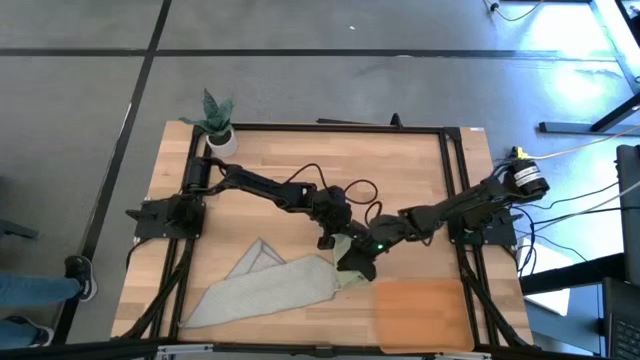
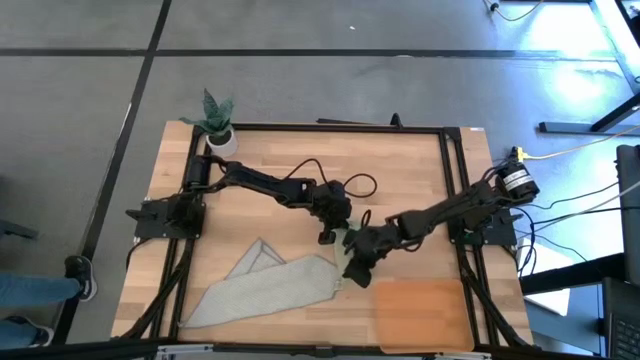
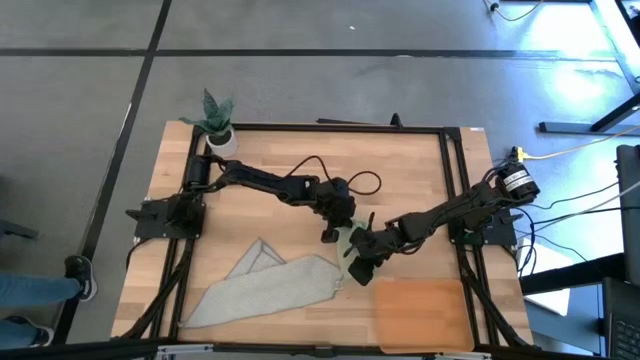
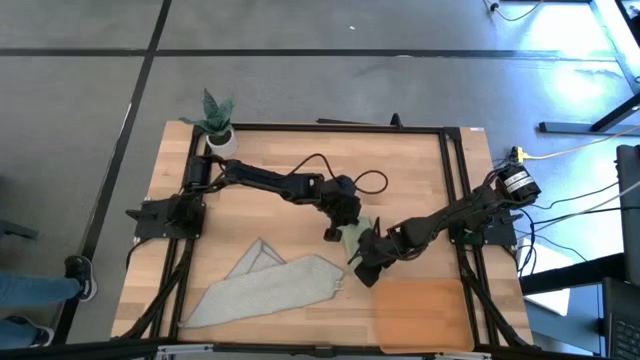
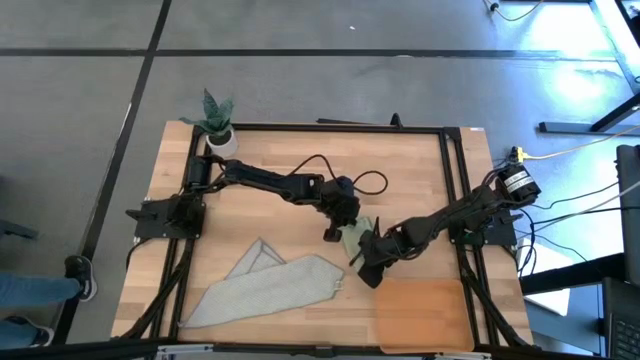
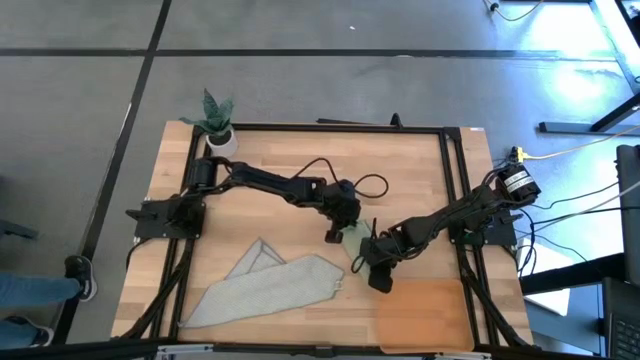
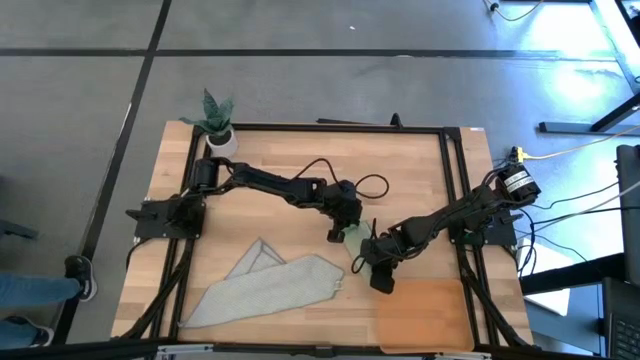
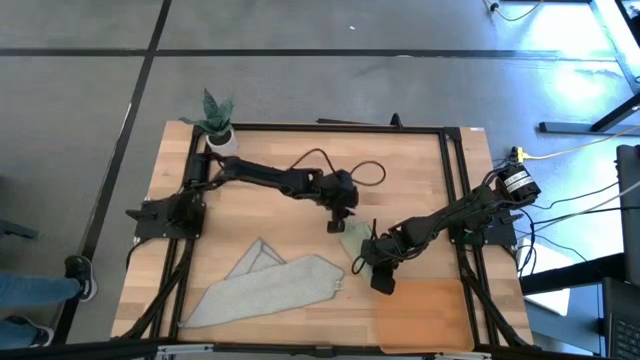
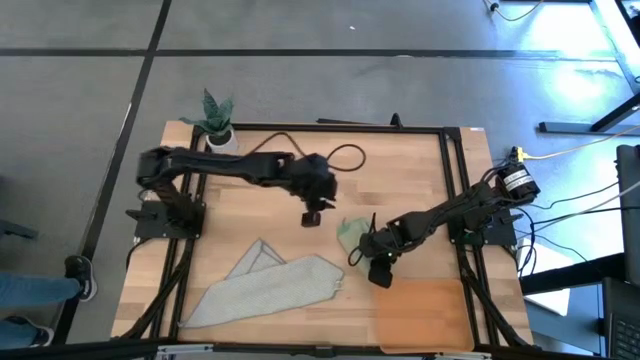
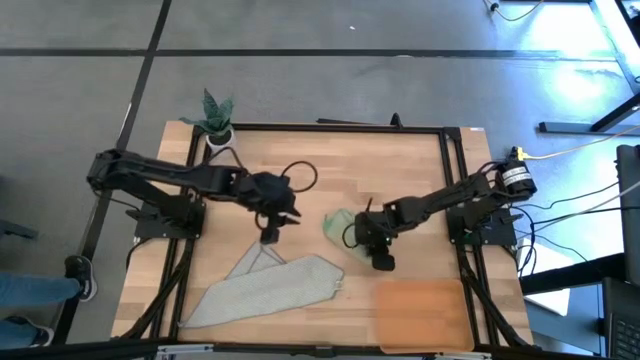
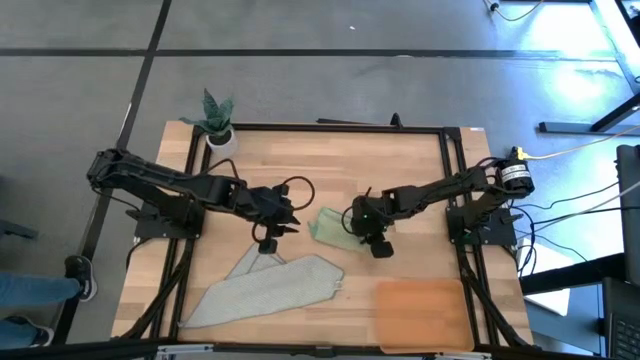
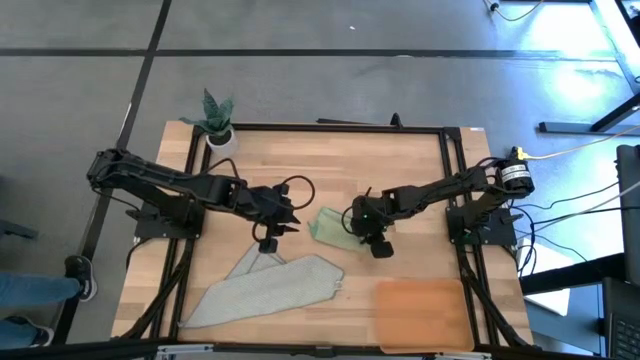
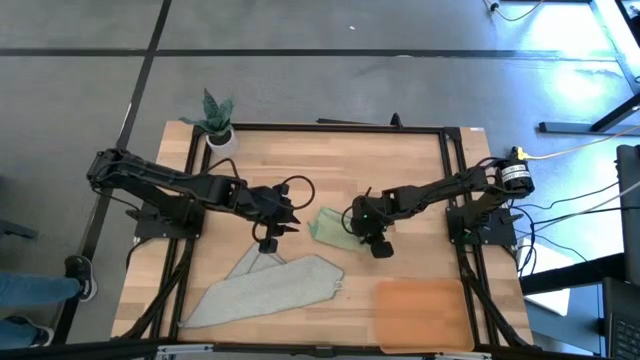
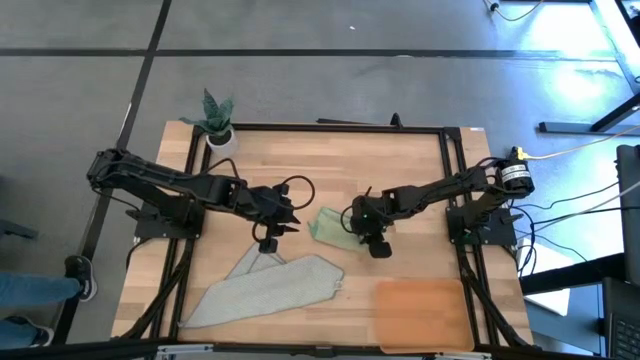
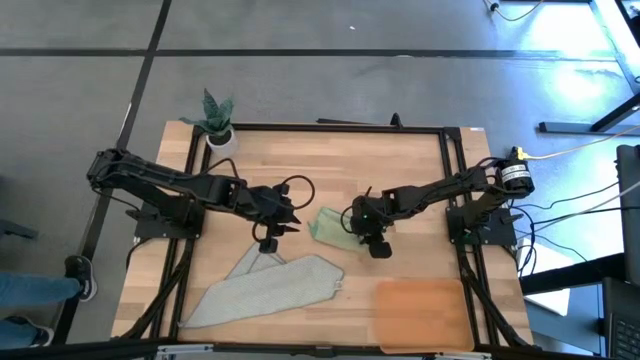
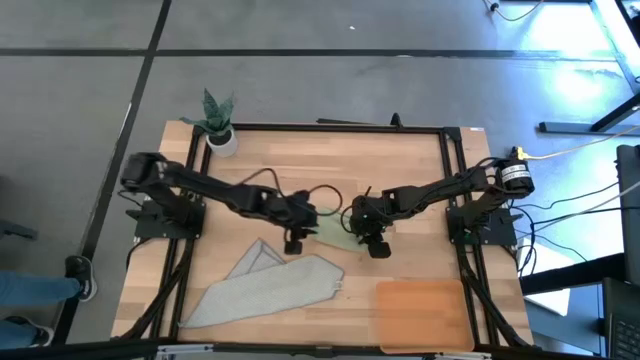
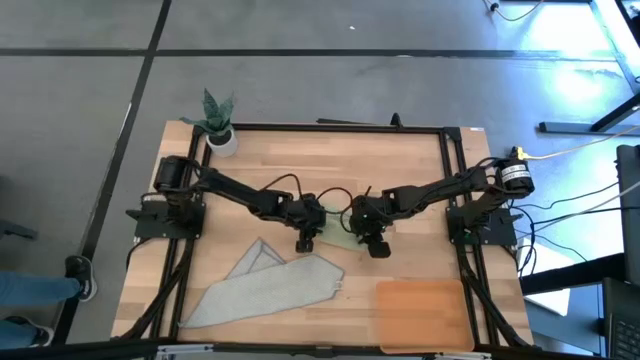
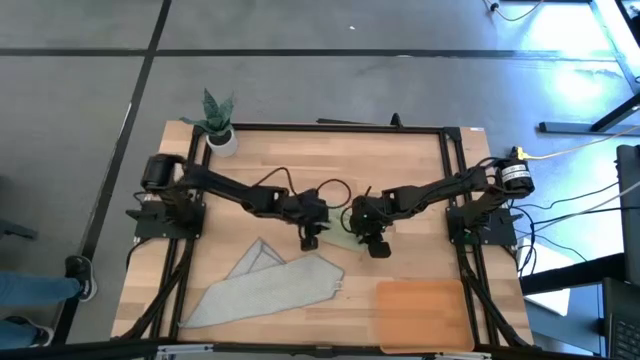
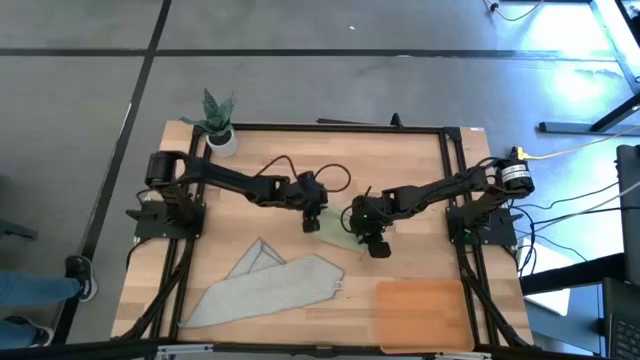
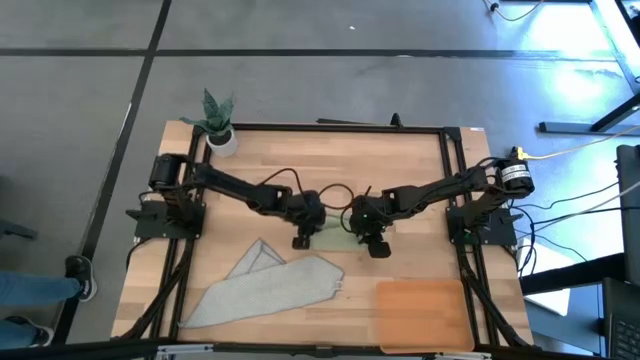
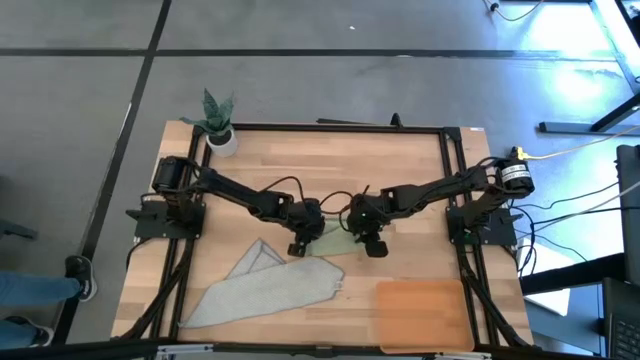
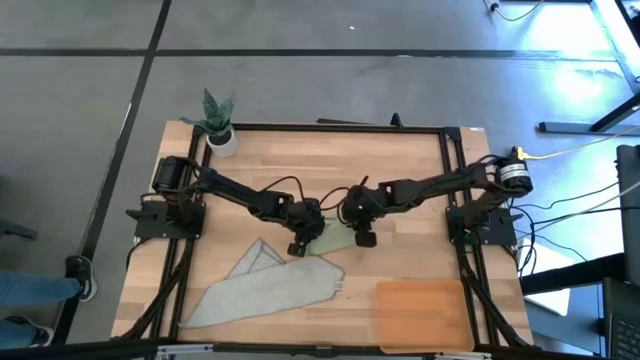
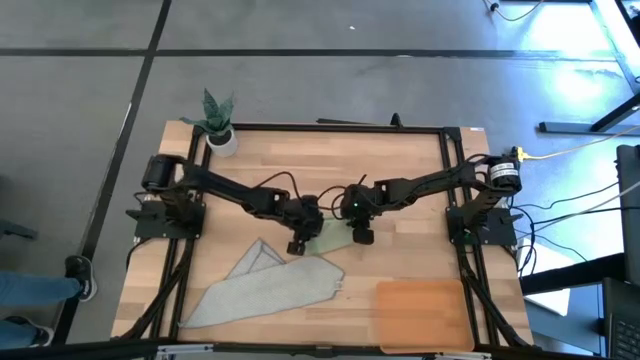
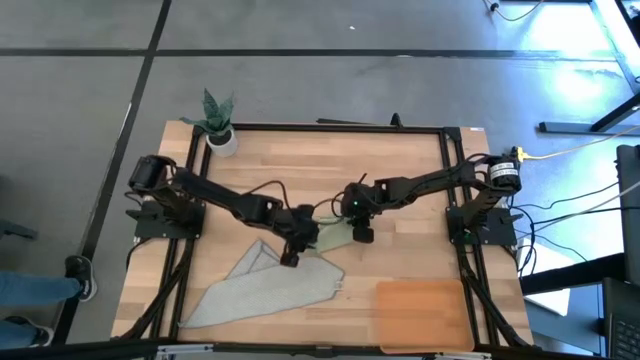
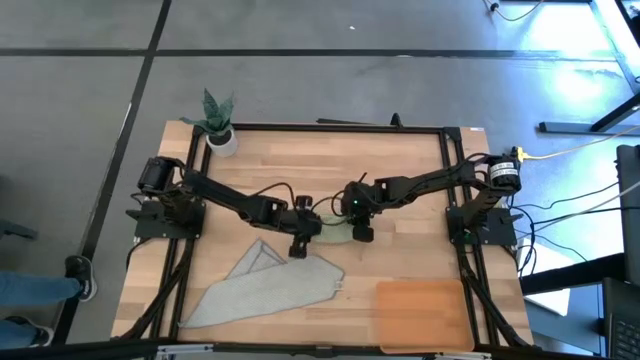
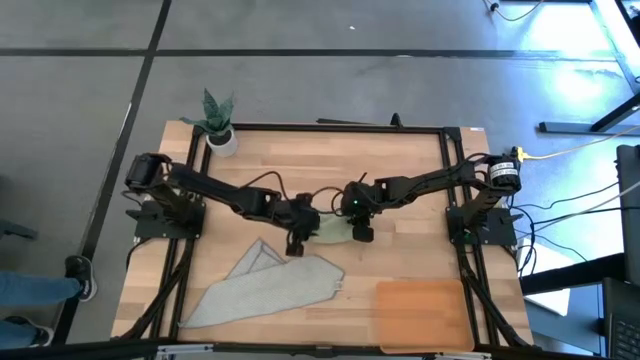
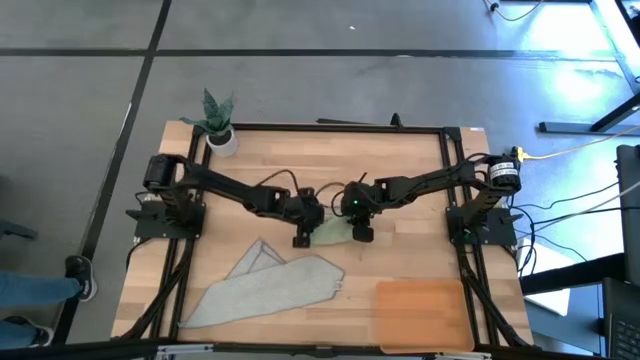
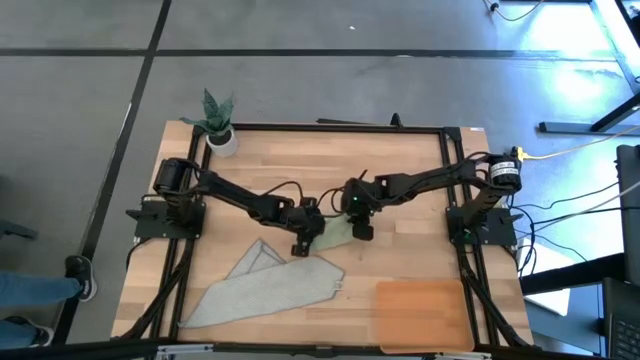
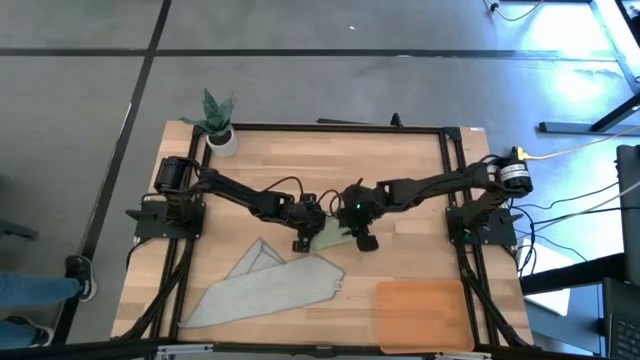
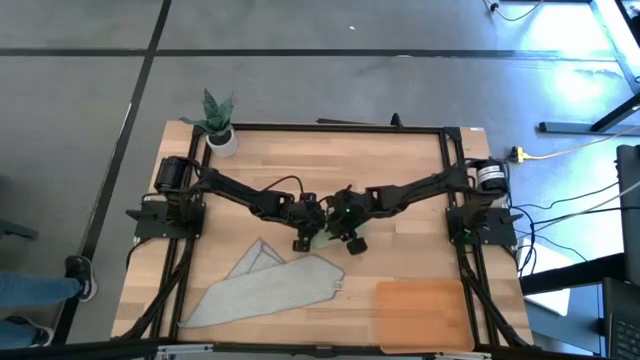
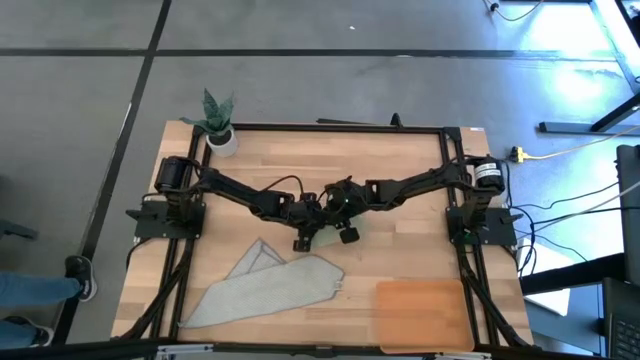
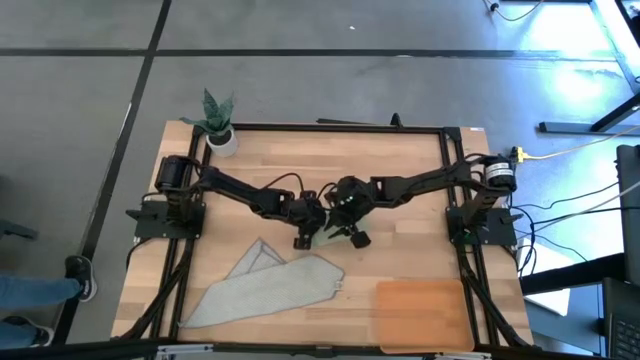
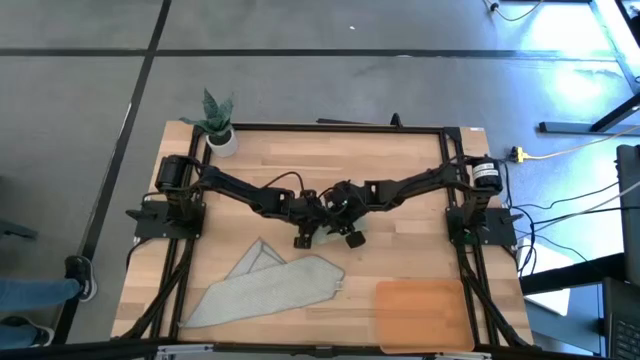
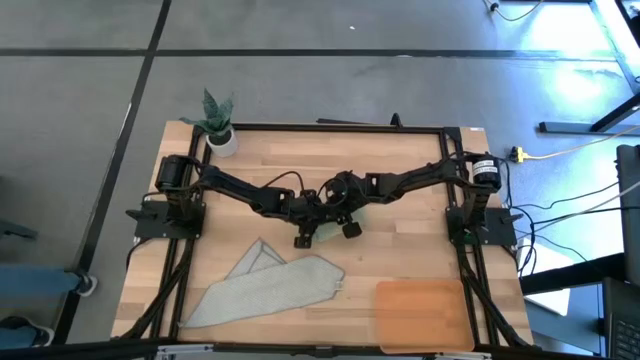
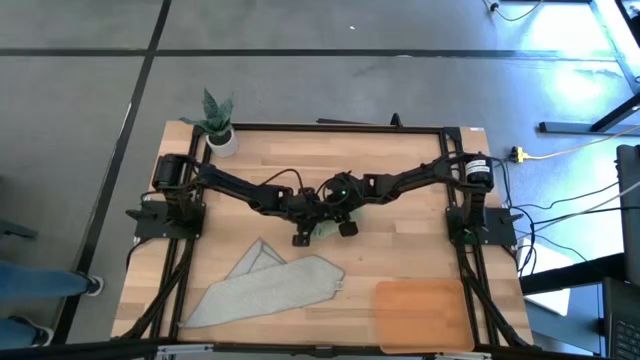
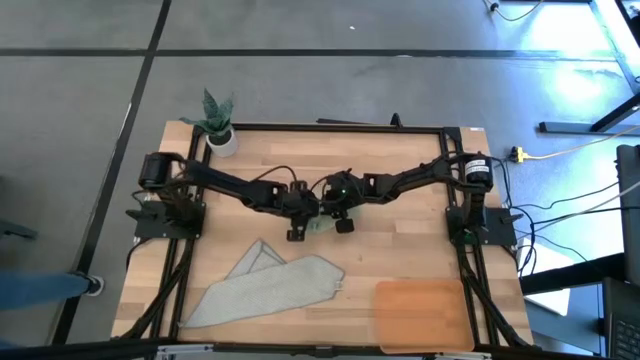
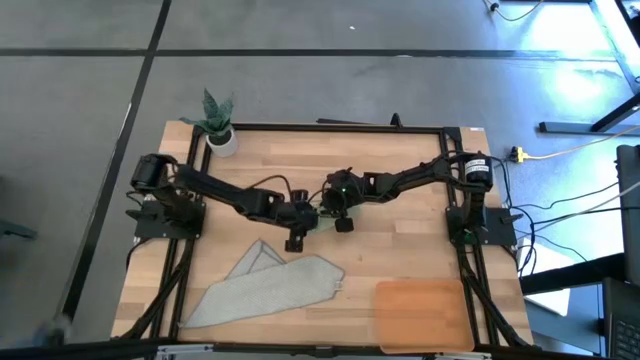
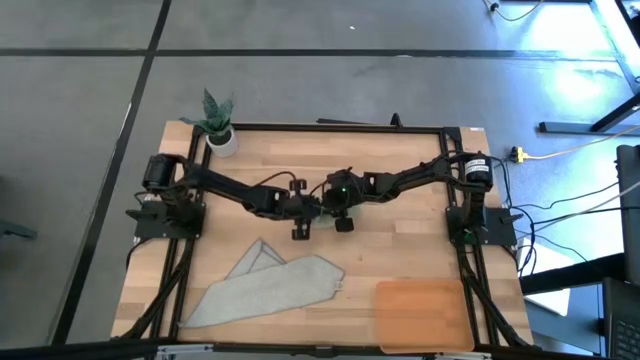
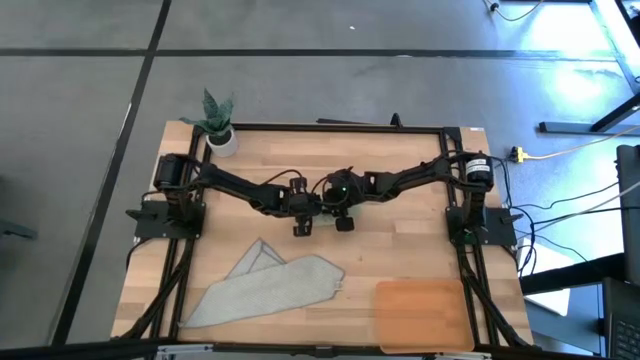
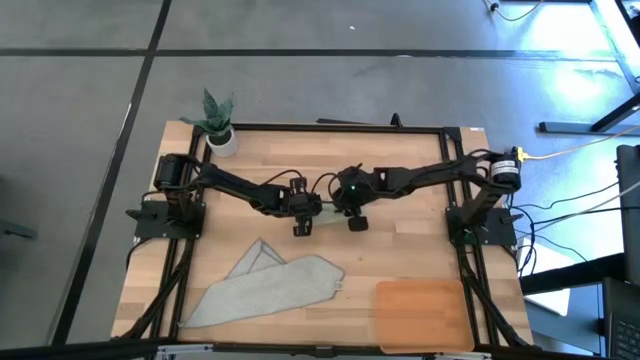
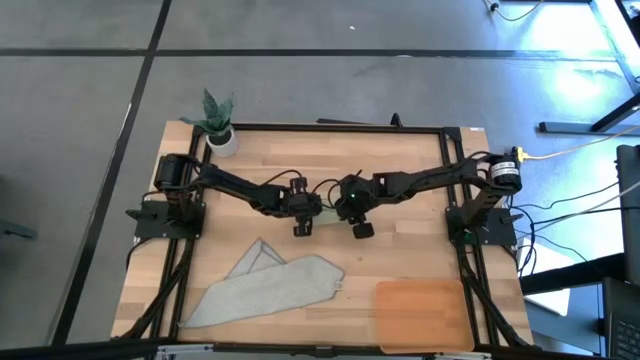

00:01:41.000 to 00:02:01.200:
Task: Roll microfiber towels into tight, uniform cylinder then place into a basket
Roll the green microfiber towel
